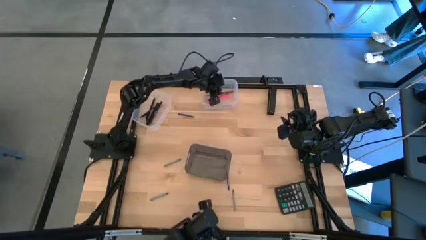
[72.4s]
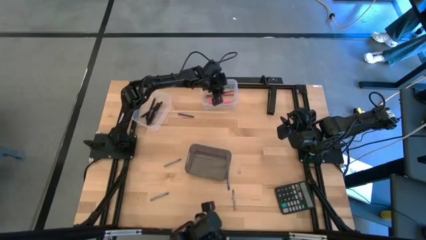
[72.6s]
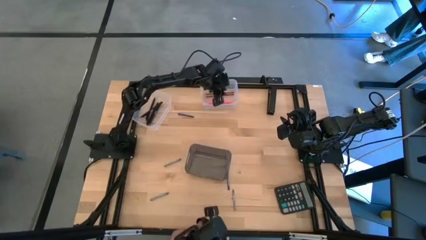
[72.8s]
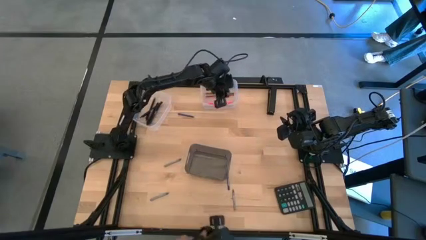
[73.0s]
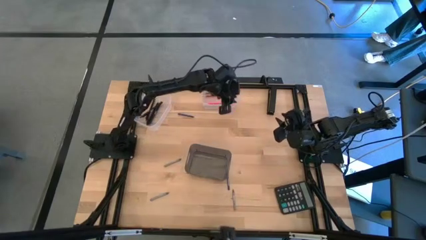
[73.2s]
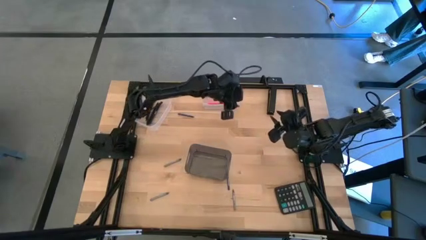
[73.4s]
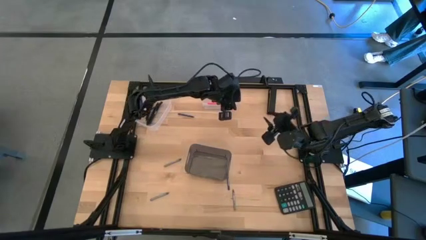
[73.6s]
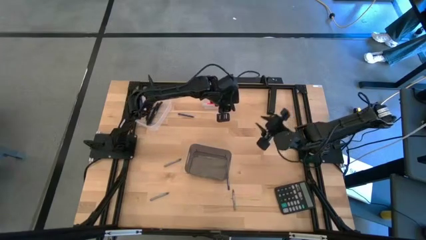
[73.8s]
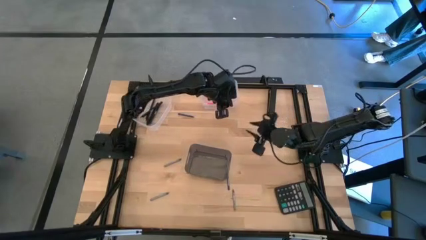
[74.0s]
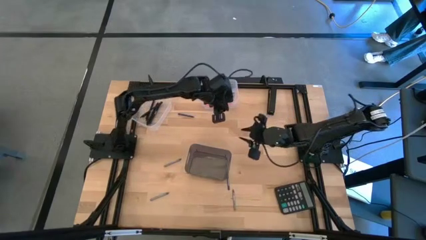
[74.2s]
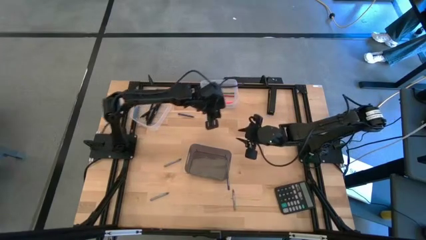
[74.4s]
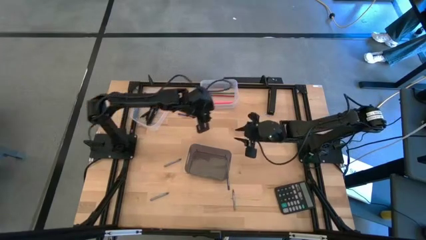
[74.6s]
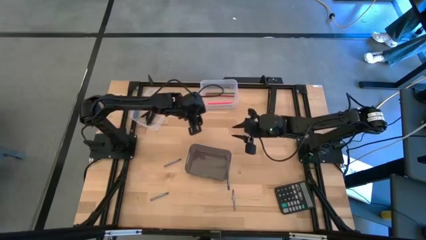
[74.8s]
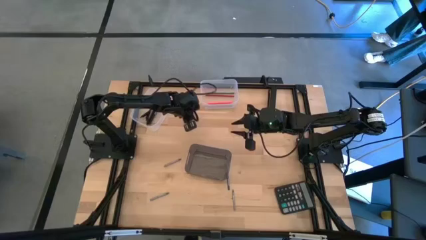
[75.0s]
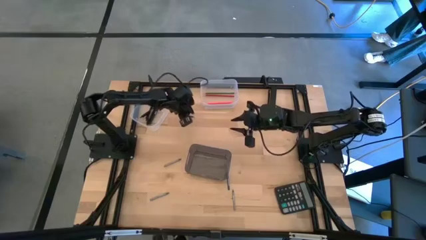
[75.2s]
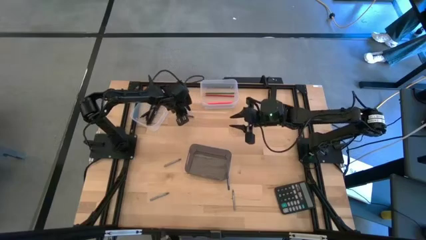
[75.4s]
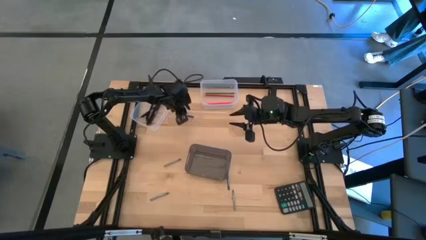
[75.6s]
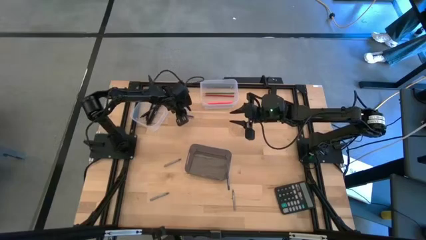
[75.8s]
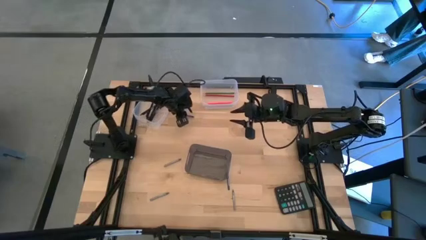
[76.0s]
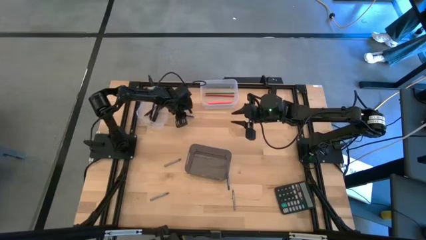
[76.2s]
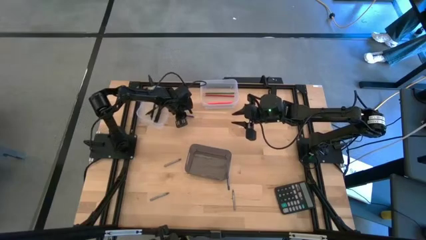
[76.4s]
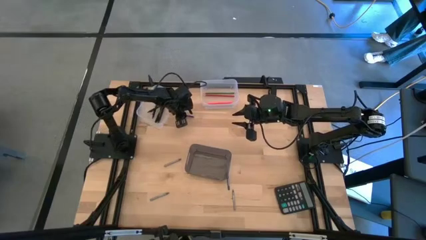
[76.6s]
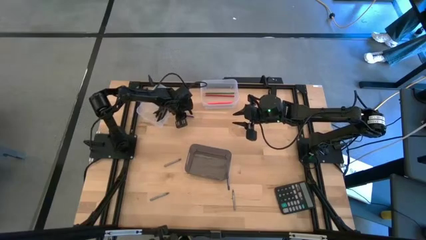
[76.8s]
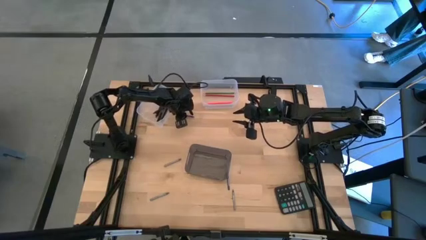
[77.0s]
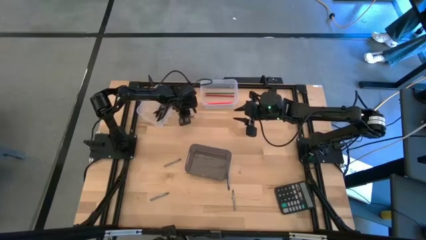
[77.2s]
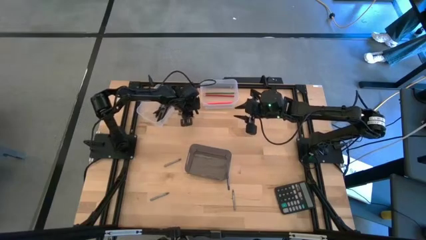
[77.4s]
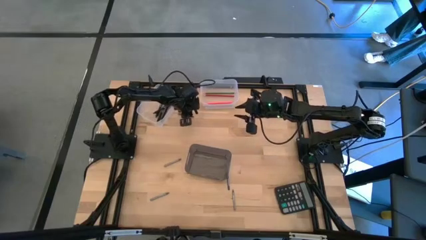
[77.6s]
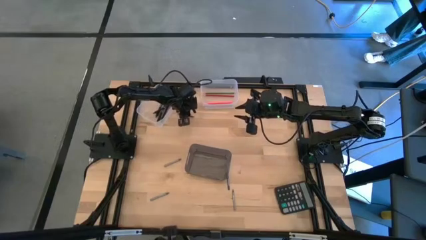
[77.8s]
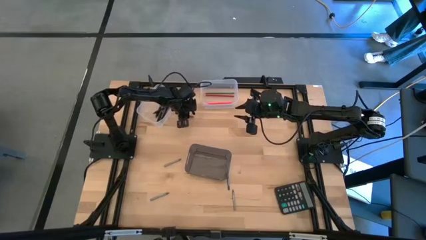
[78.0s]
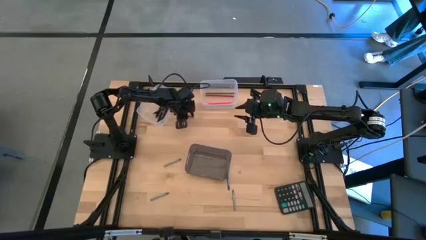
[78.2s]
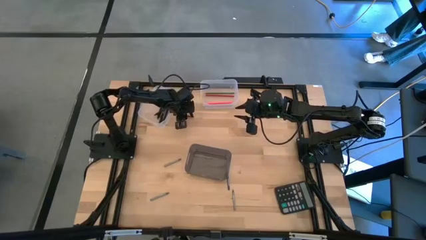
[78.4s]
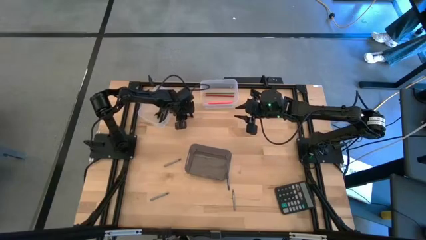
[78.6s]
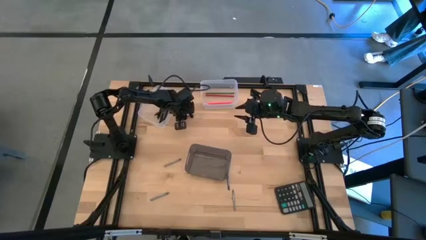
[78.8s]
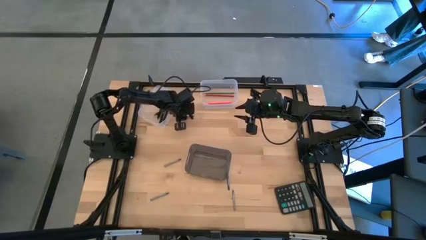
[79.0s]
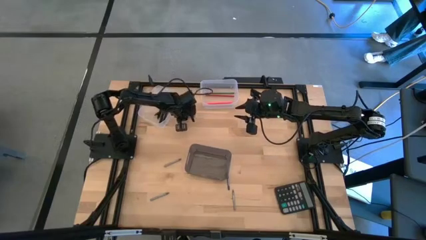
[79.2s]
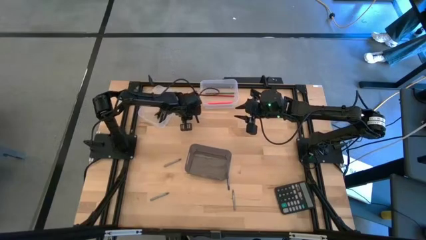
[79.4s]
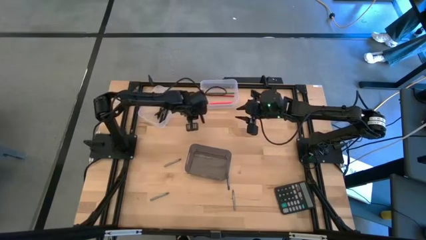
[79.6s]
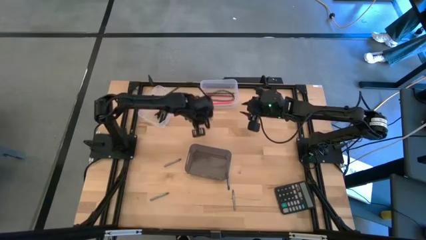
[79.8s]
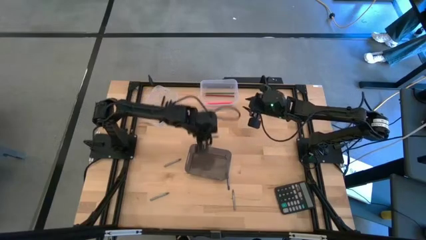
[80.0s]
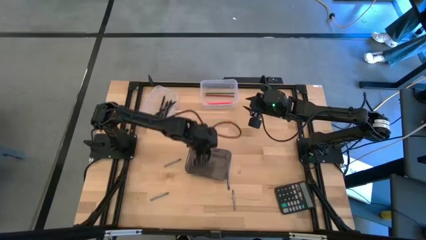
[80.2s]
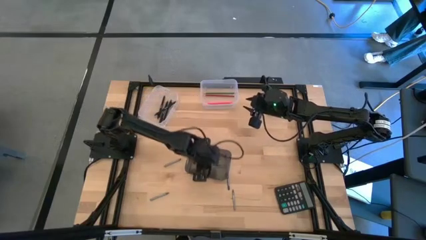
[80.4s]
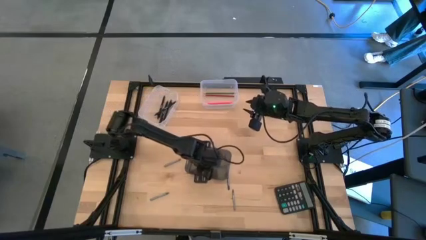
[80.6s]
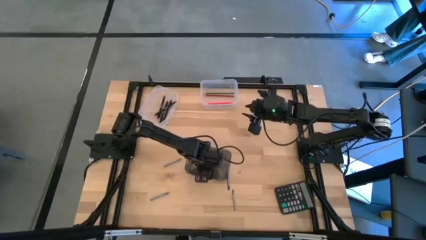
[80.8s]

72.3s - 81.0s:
Task: Sort crayons/erasers/pens/pencils in bins
Put the blue crayon into the black bin

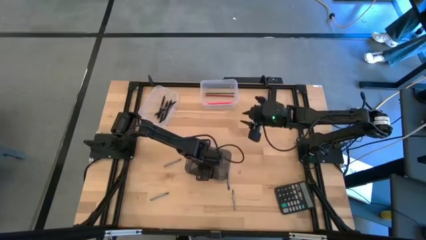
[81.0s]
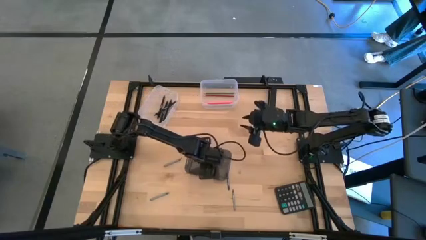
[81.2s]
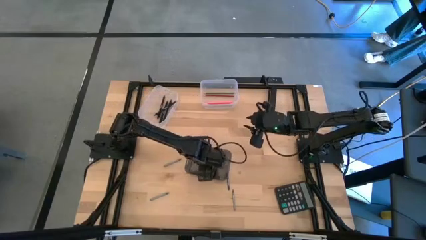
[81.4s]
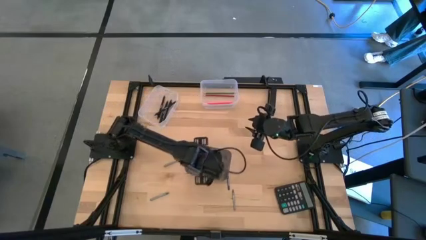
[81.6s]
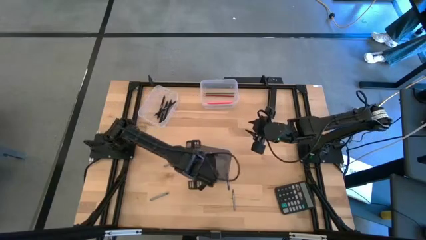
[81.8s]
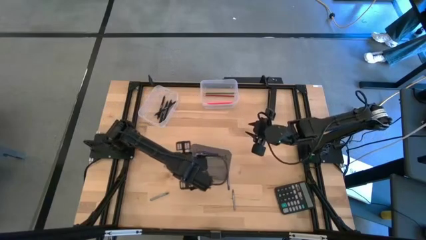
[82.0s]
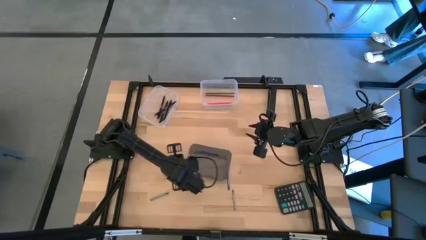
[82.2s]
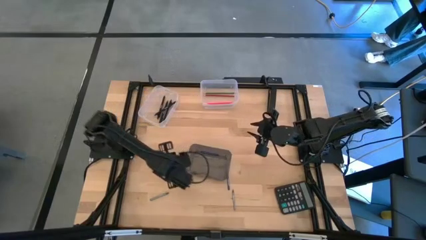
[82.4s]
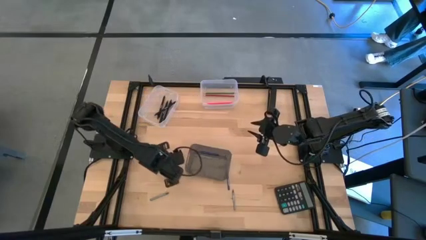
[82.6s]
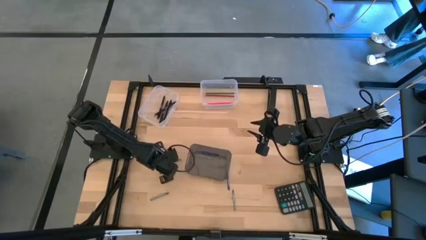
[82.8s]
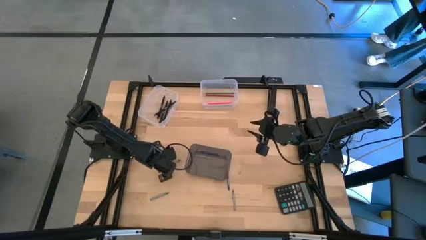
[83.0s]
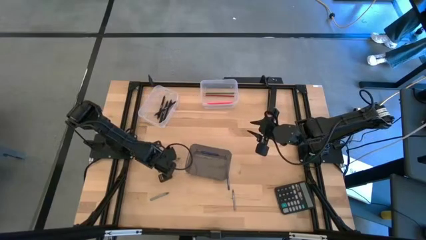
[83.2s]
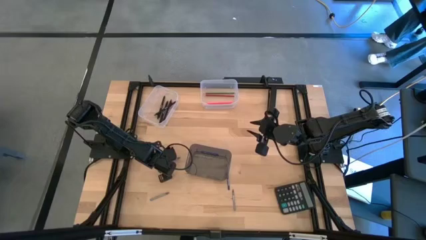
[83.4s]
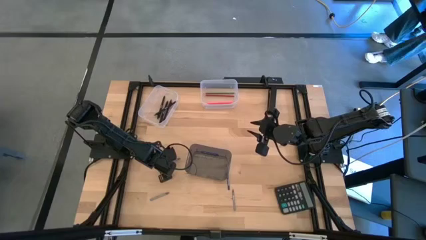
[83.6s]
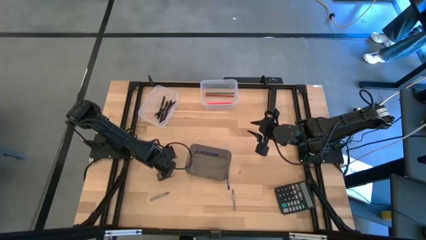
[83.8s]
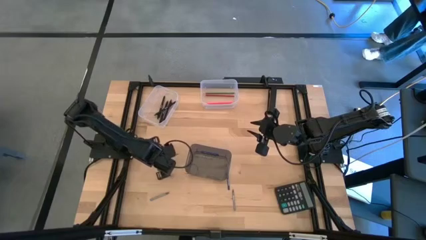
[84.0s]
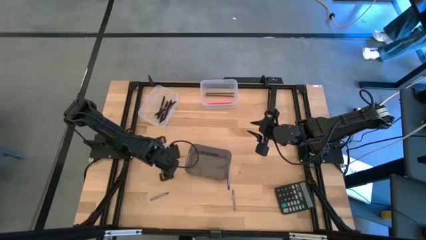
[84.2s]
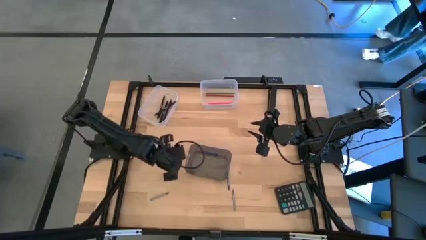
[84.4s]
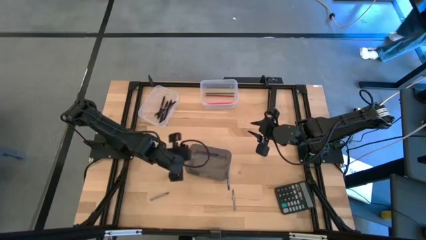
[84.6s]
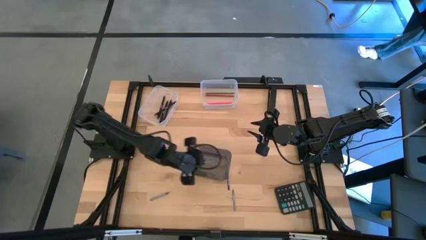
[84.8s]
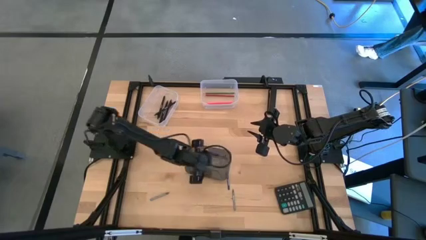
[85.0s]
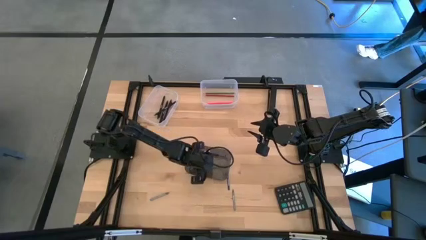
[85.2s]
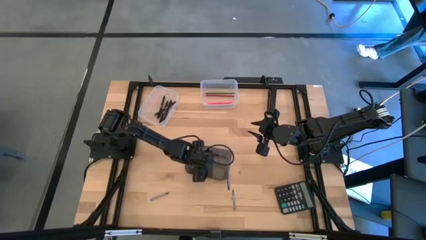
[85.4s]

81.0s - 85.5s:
Put the gray crayon into the black bin

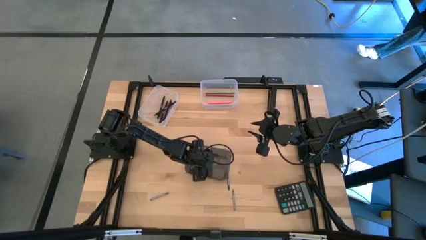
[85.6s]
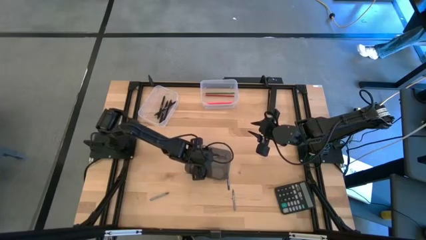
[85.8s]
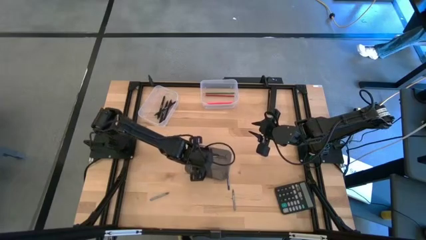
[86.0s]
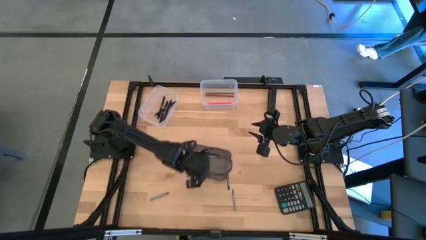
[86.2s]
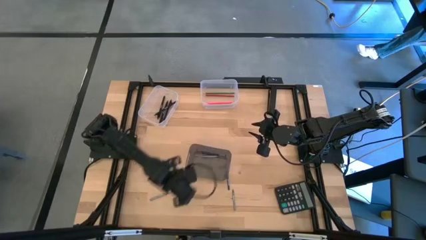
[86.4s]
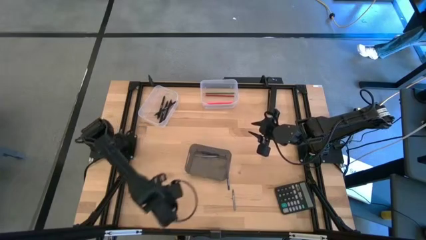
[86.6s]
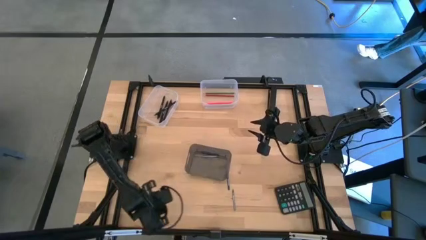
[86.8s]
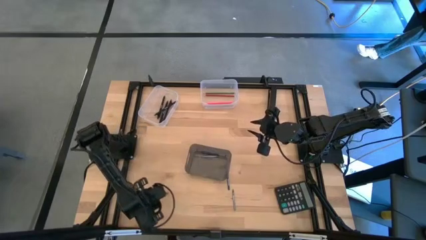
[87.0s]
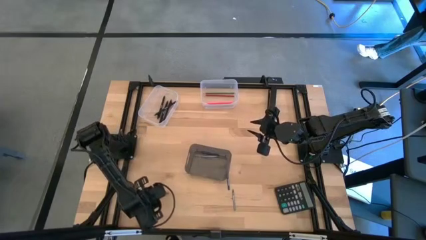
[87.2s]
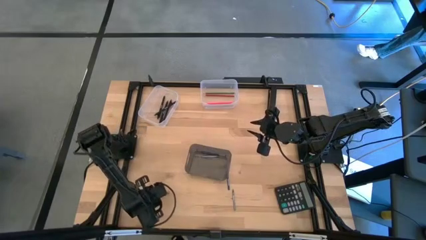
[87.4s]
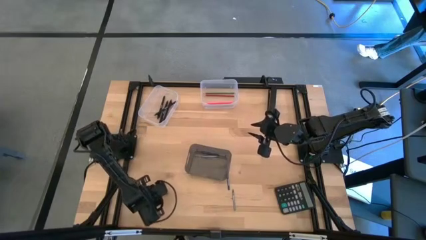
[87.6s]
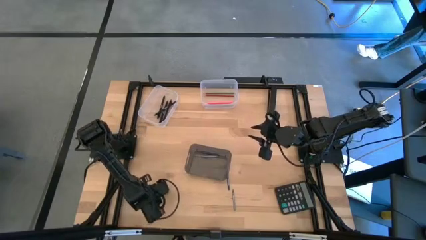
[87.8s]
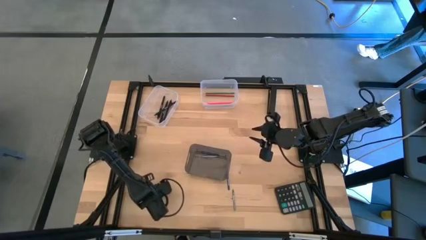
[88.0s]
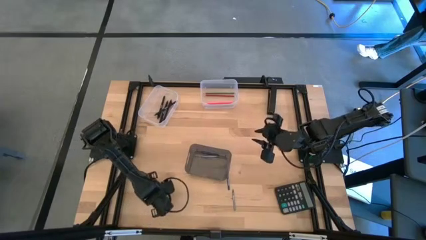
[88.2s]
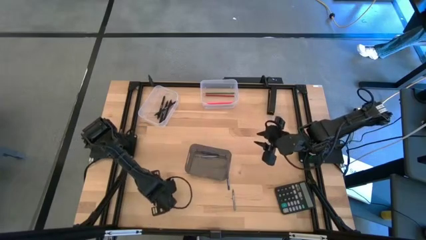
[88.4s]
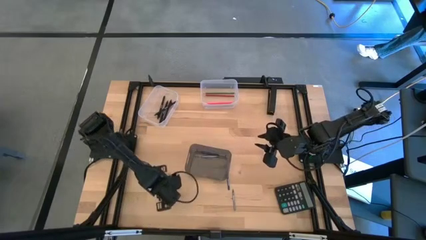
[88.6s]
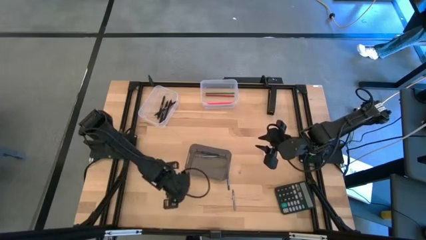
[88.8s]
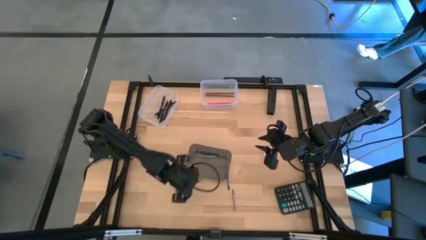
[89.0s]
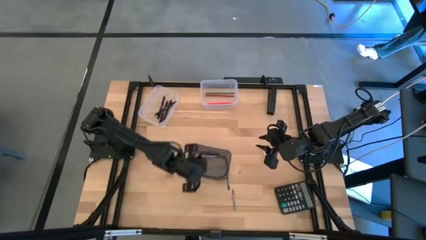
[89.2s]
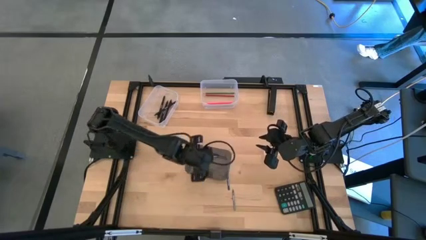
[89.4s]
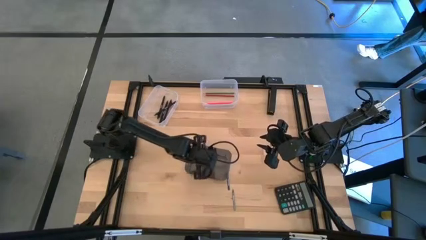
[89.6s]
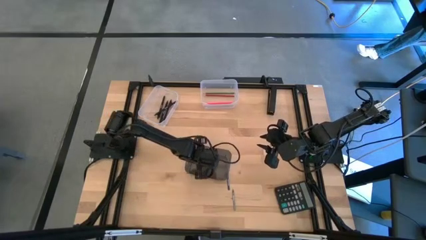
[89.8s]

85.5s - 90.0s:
Put the gray crayon into the black bin
